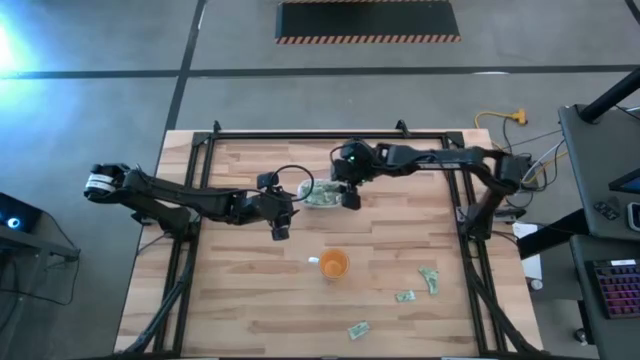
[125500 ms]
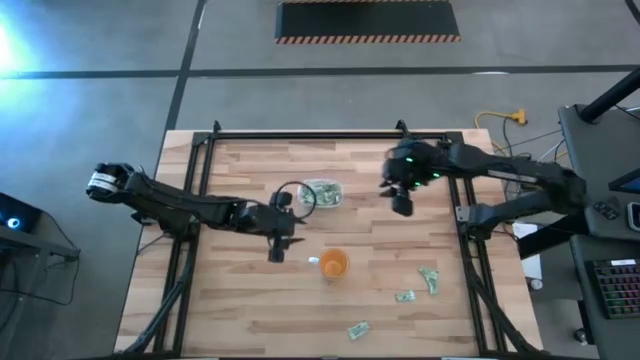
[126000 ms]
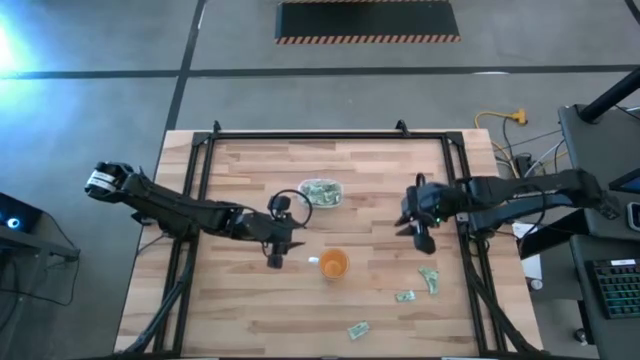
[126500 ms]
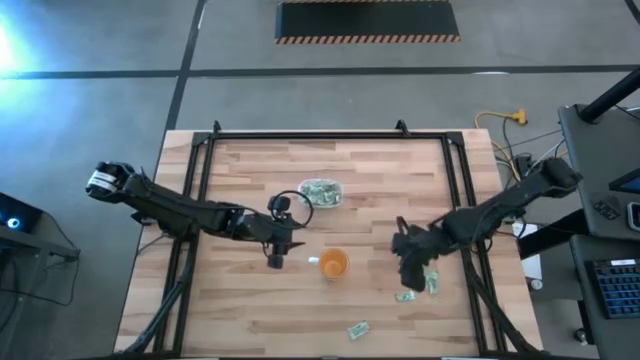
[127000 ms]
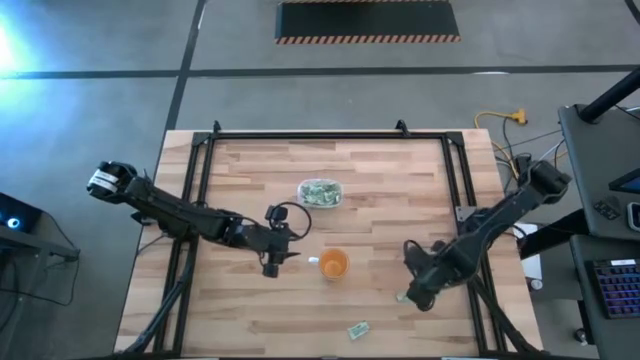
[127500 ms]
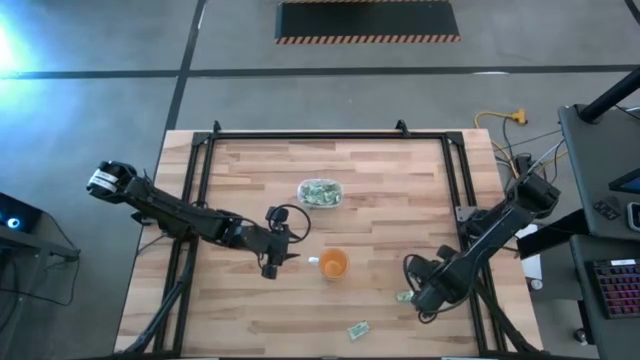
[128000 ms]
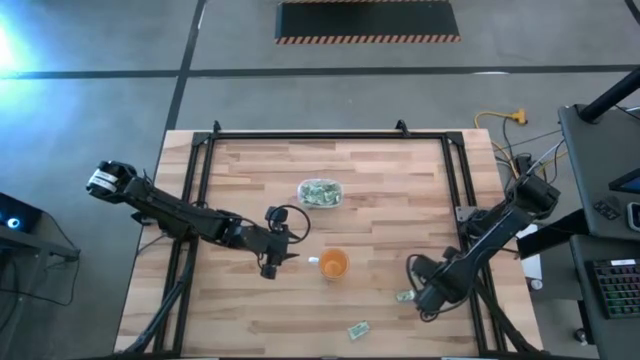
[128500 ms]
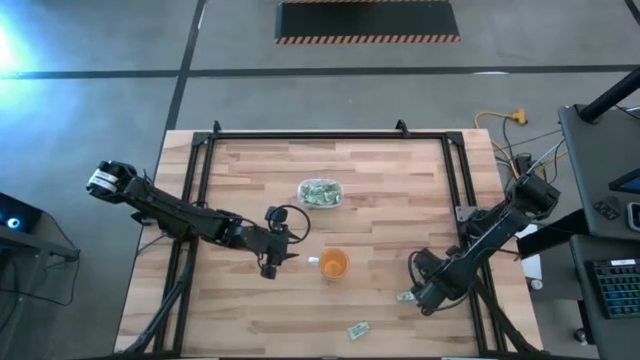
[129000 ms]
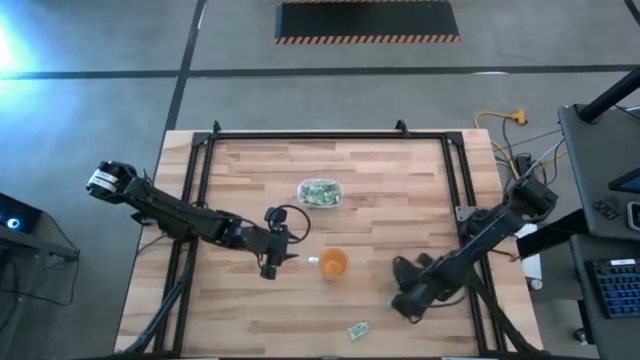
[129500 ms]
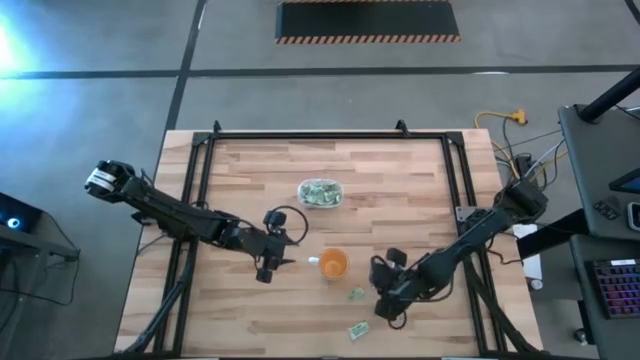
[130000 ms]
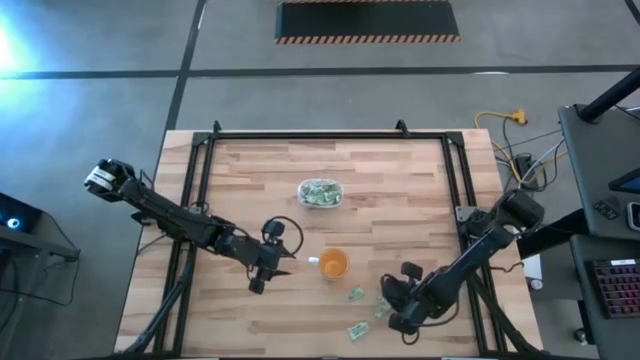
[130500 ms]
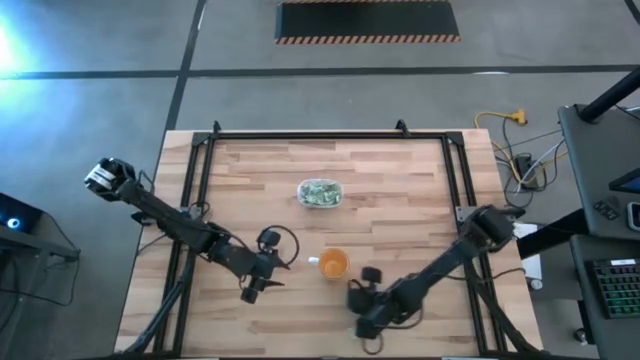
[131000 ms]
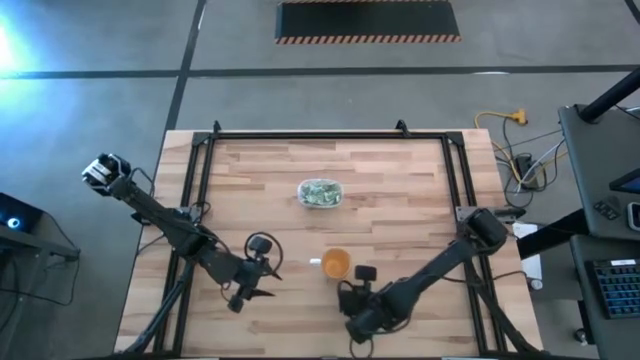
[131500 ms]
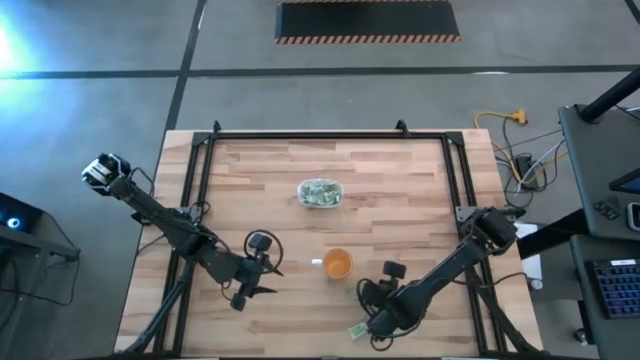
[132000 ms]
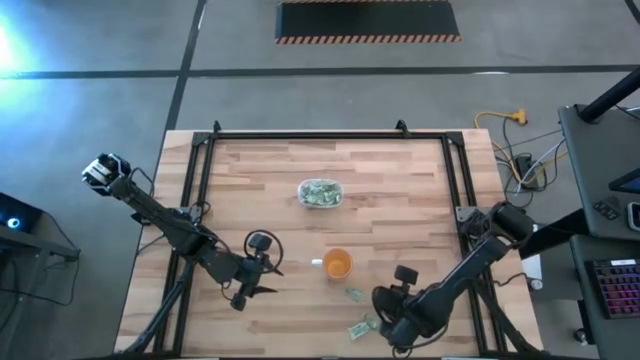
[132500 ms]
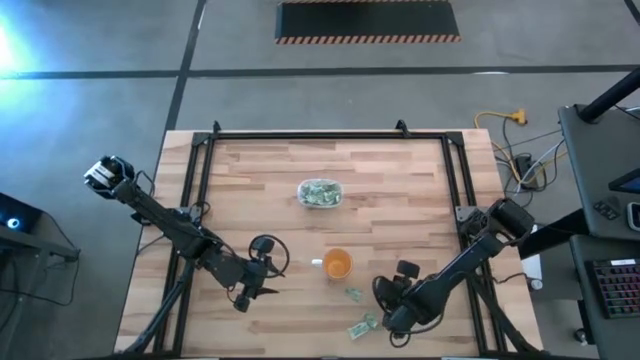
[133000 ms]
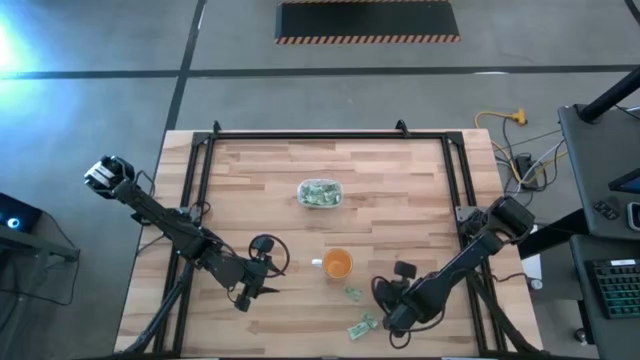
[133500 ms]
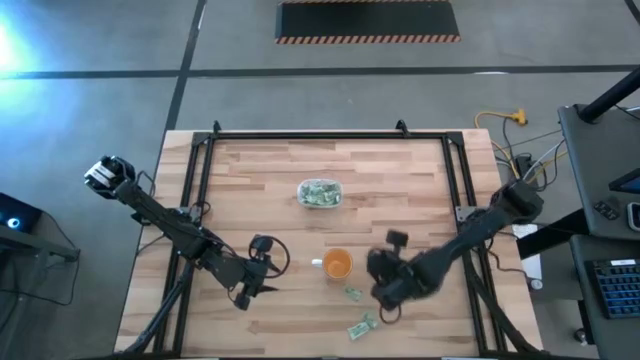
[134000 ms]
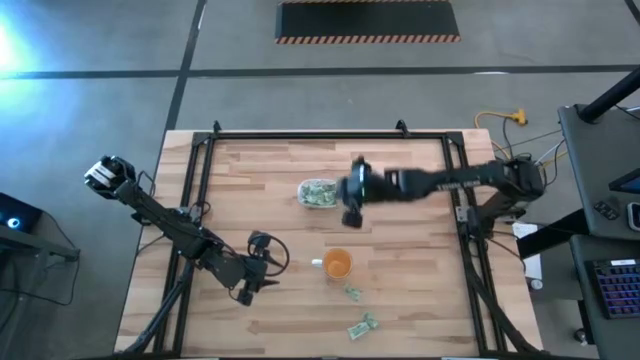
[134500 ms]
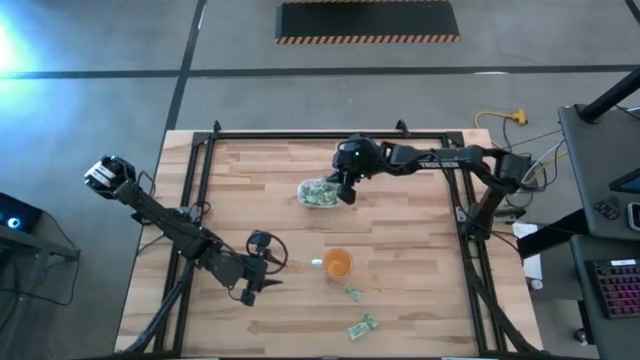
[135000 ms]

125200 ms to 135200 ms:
Task: Pick and place Stevia / Truvia into bins
Put the stevia packet into the transparent bin

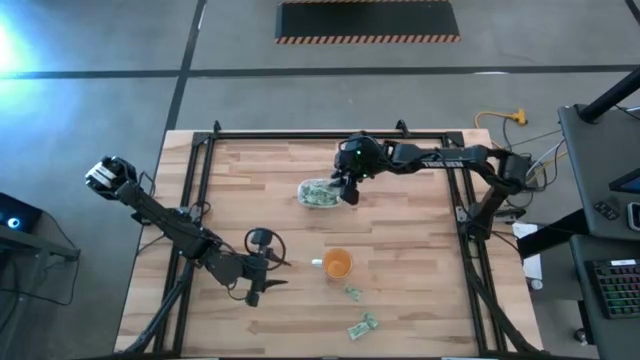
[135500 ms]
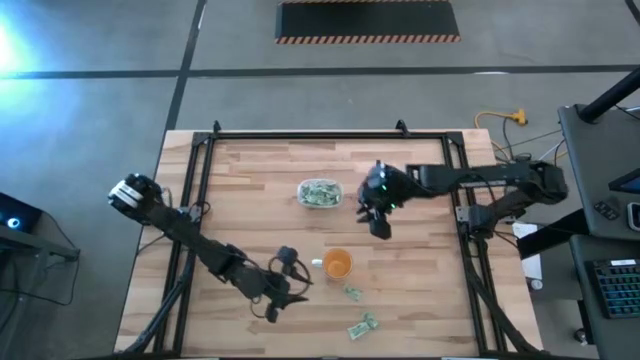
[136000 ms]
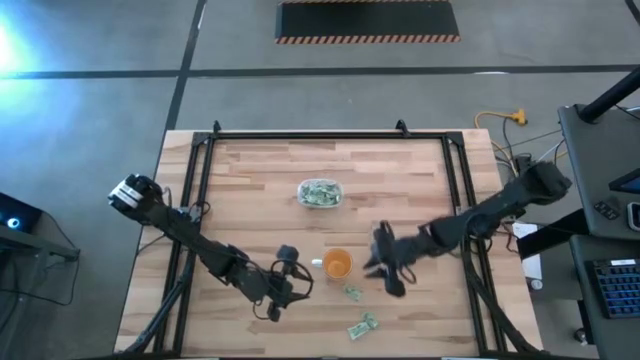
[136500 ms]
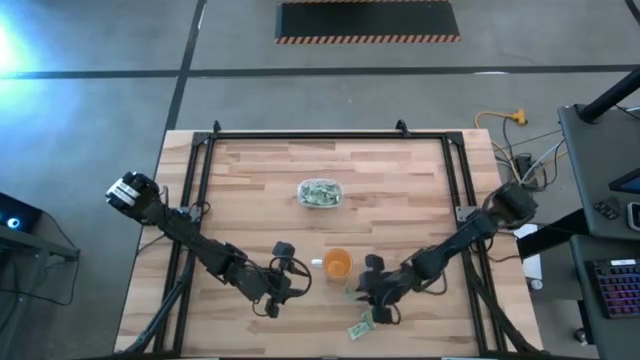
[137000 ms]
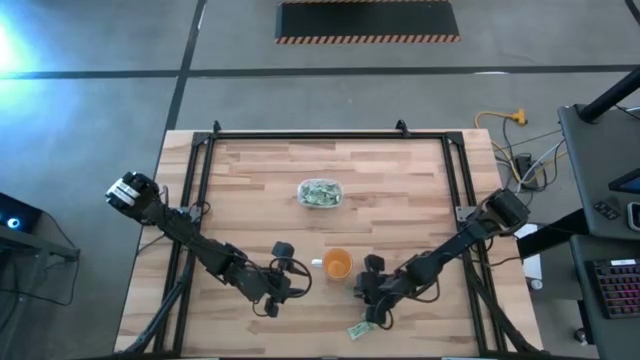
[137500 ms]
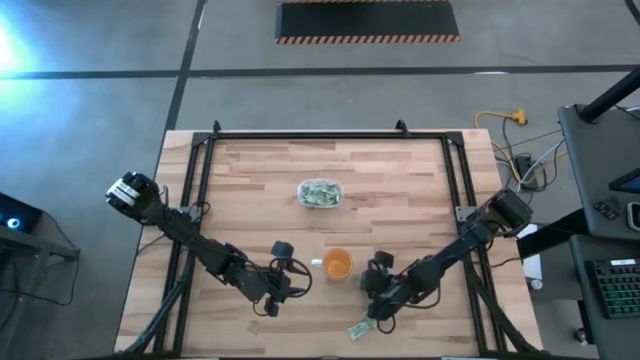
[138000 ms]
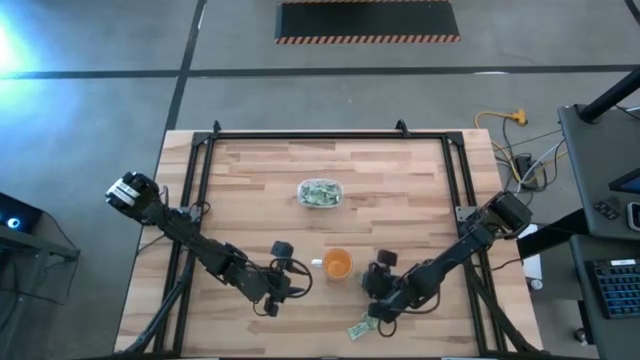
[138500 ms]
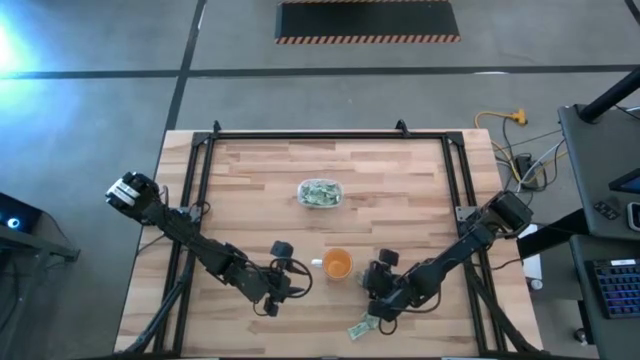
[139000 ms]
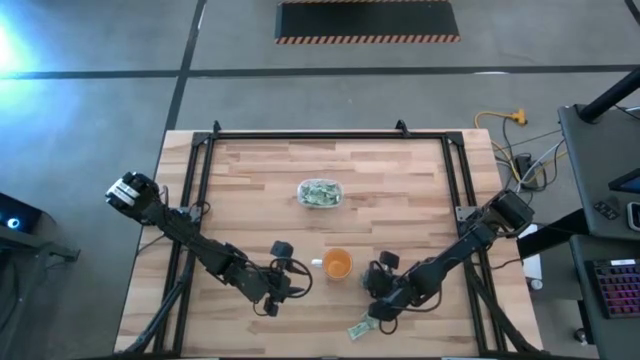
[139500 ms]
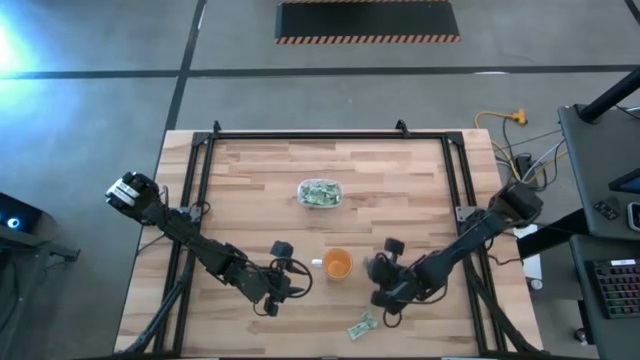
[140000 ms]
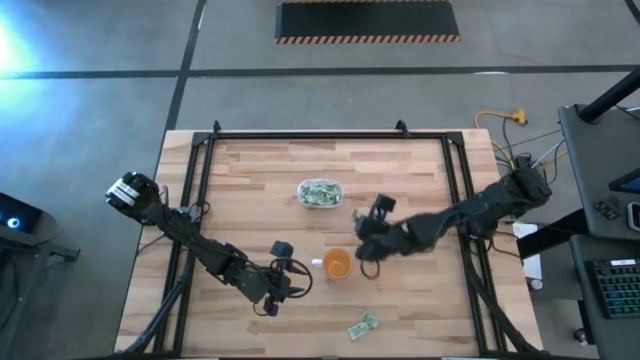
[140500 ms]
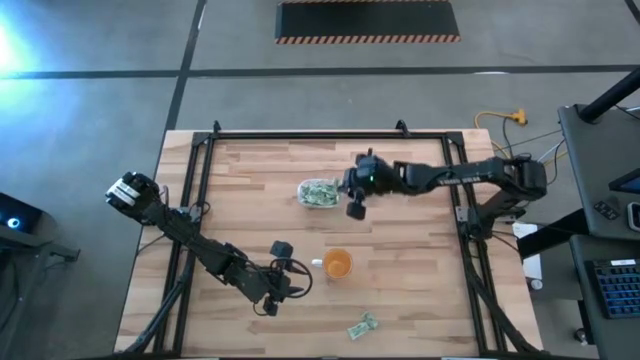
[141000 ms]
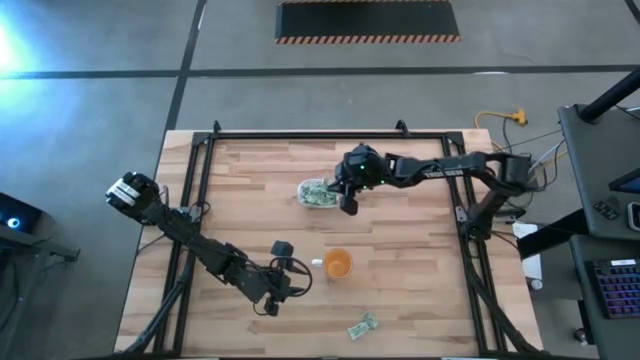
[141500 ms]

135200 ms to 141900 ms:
Put the stevia packet into the transparent bin

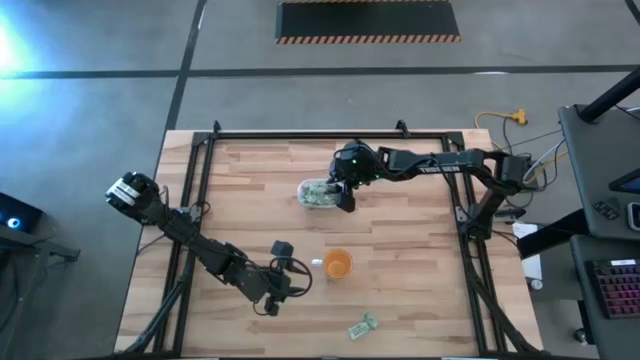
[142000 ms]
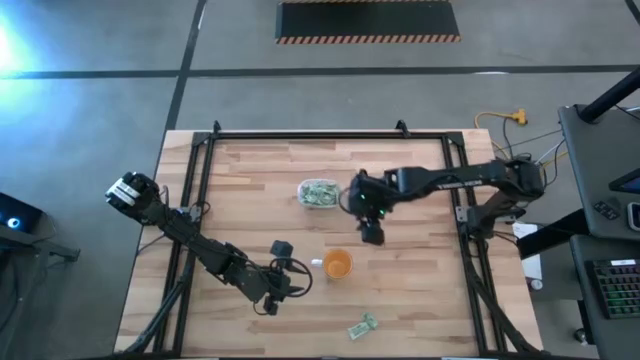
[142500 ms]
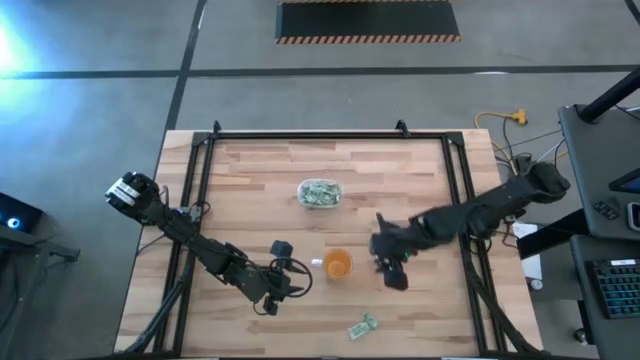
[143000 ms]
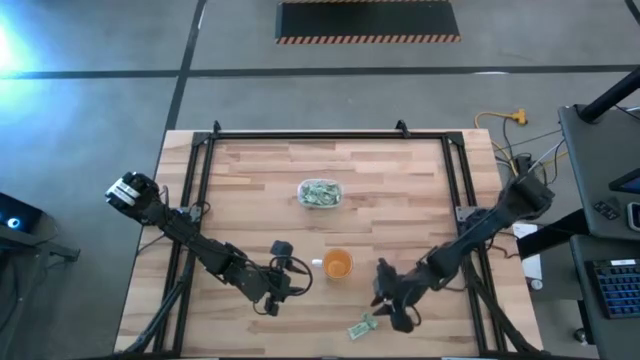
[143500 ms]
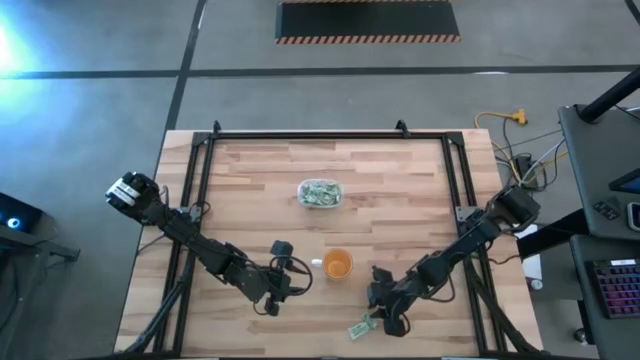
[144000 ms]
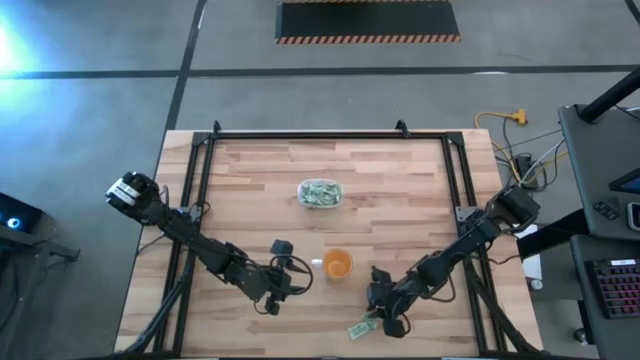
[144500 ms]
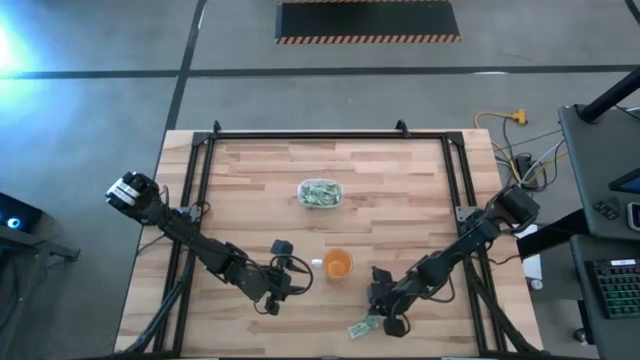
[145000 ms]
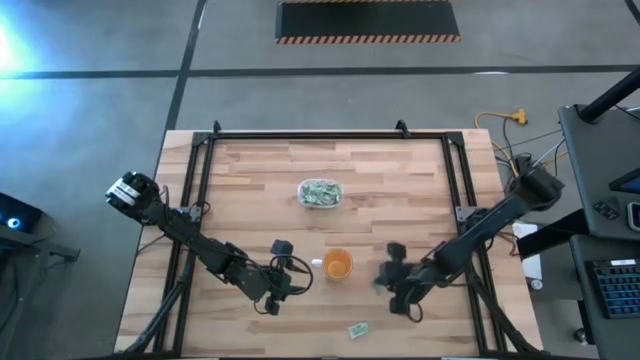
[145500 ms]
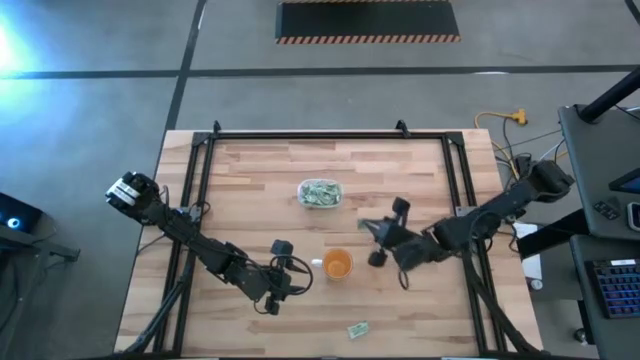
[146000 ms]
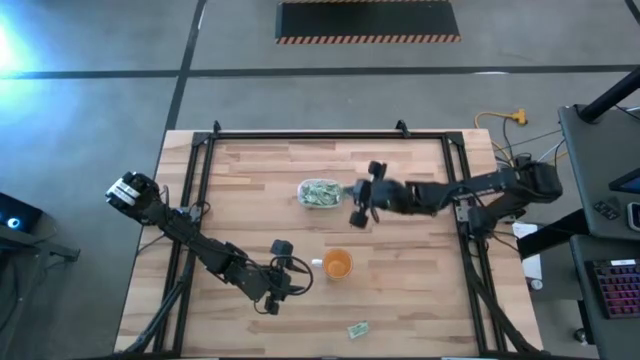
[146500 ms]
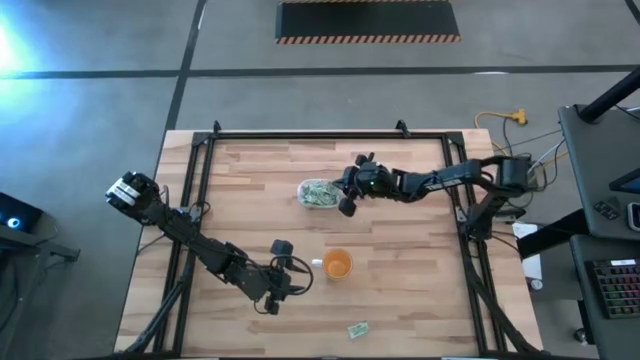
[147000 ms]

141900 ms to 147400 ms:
Put the stevia packet into the transparent bin
